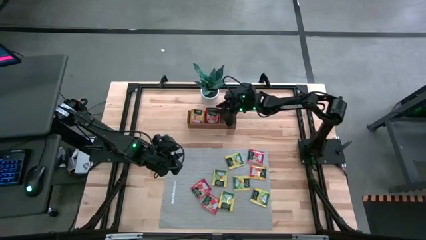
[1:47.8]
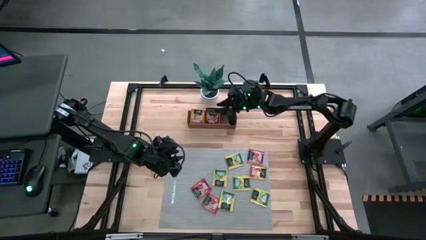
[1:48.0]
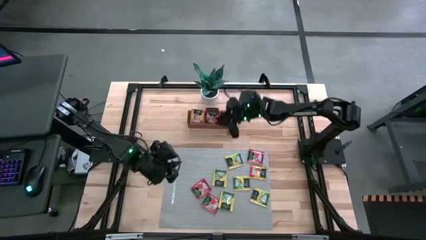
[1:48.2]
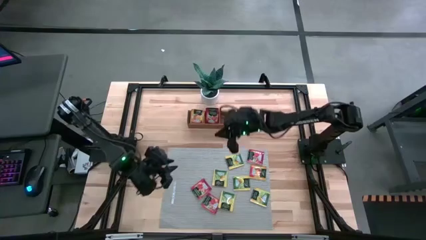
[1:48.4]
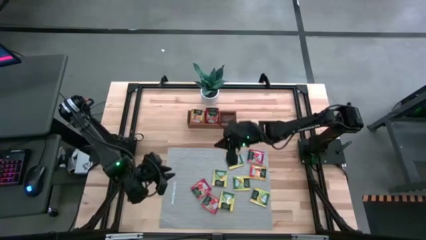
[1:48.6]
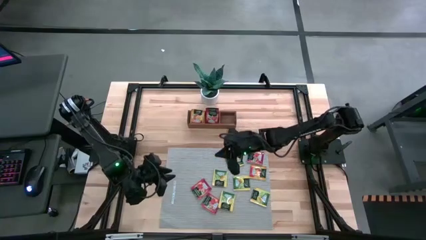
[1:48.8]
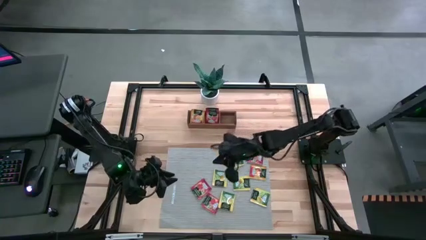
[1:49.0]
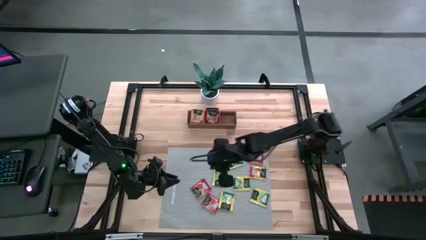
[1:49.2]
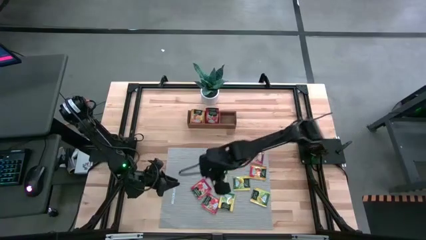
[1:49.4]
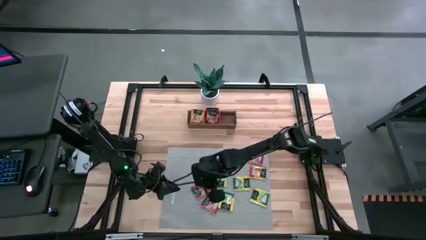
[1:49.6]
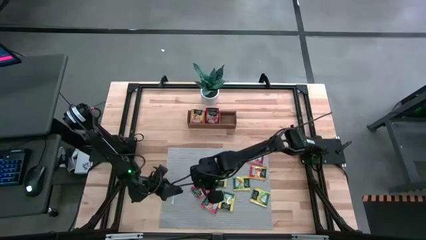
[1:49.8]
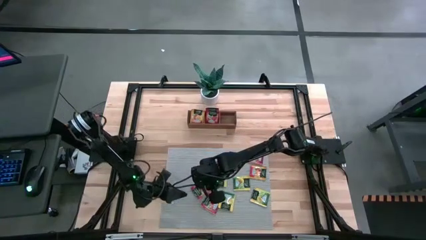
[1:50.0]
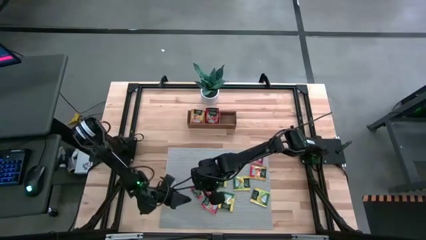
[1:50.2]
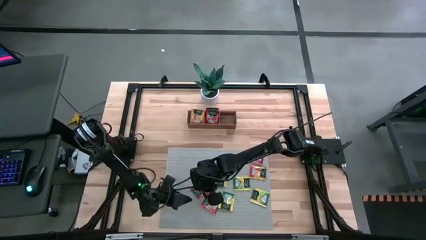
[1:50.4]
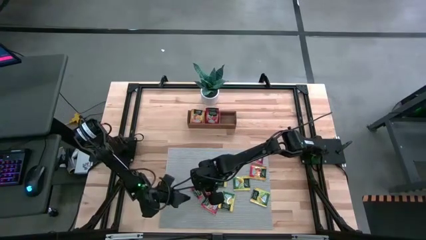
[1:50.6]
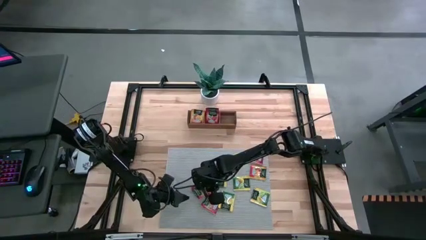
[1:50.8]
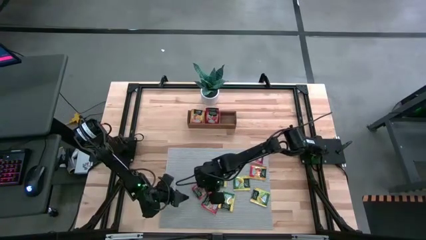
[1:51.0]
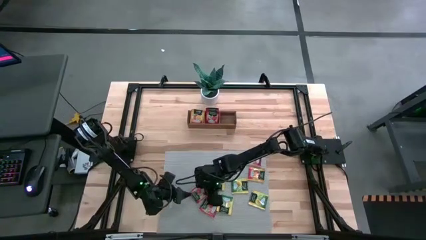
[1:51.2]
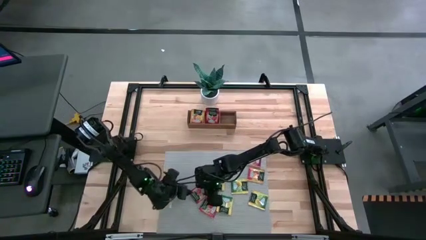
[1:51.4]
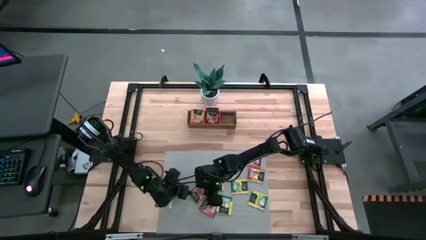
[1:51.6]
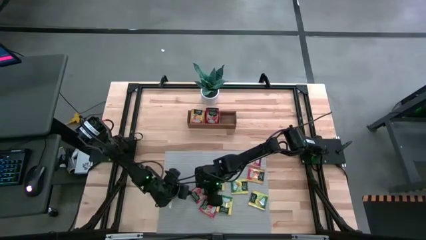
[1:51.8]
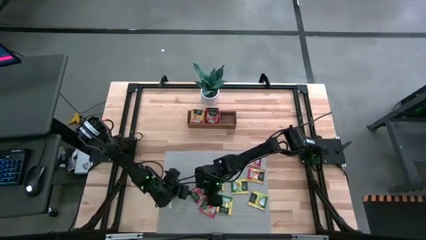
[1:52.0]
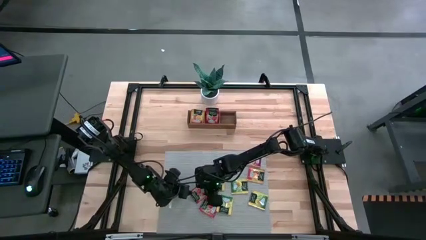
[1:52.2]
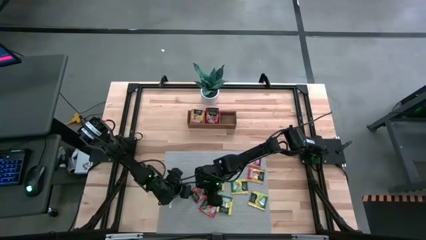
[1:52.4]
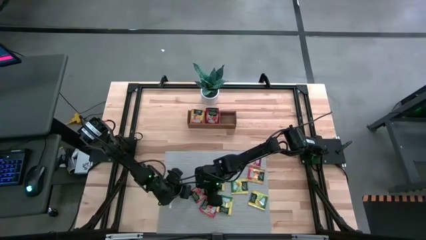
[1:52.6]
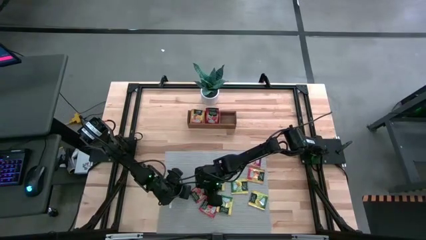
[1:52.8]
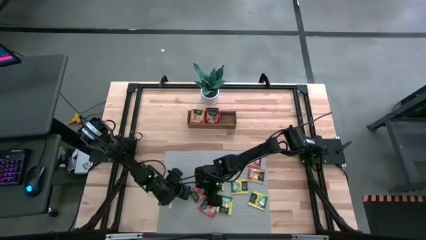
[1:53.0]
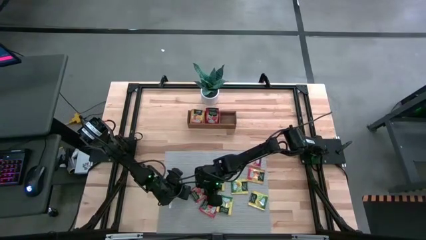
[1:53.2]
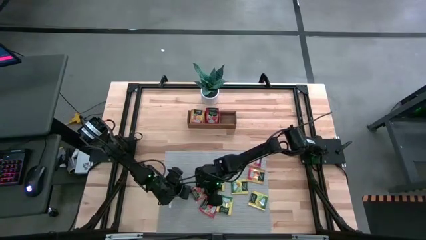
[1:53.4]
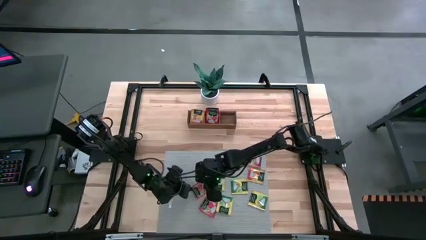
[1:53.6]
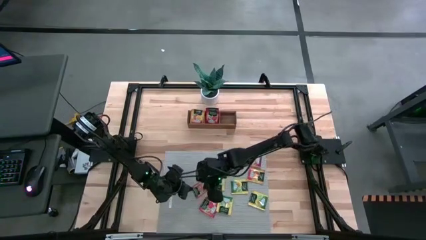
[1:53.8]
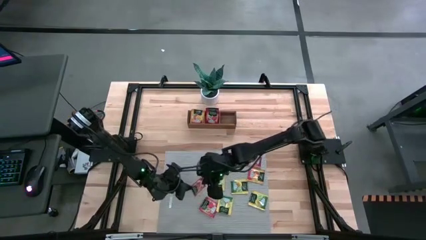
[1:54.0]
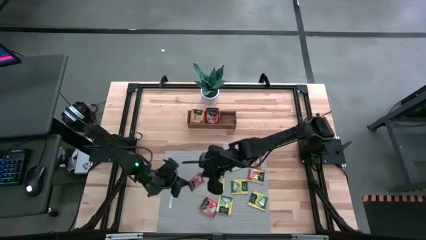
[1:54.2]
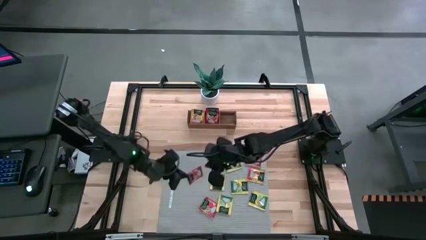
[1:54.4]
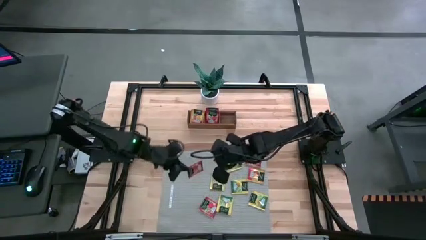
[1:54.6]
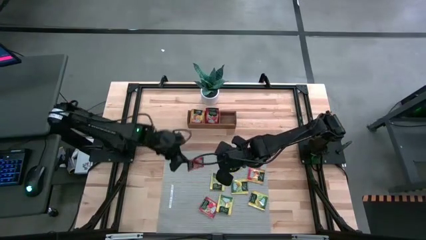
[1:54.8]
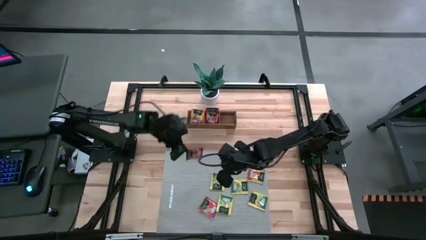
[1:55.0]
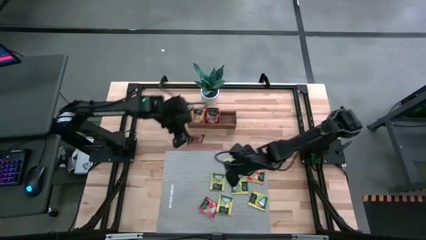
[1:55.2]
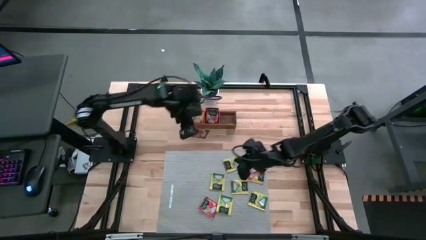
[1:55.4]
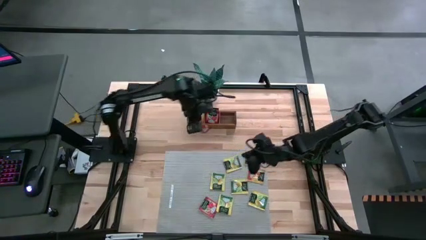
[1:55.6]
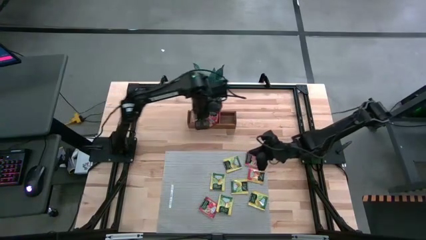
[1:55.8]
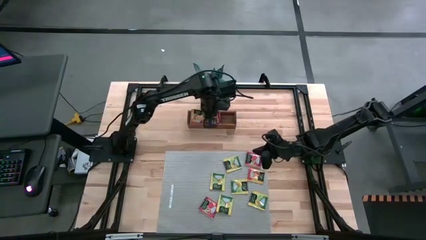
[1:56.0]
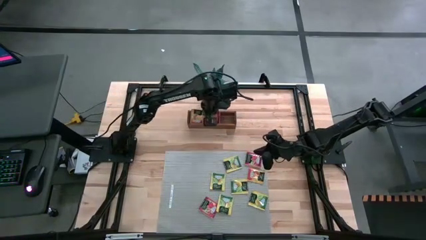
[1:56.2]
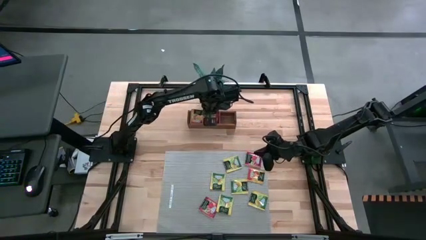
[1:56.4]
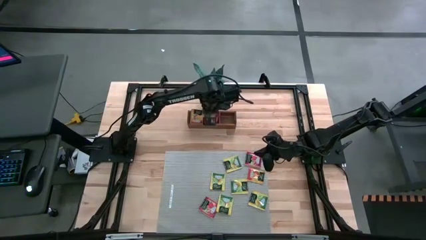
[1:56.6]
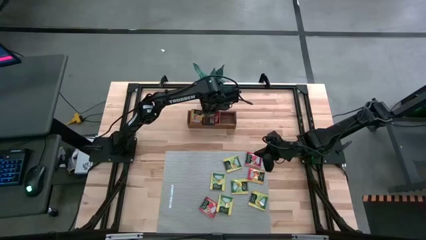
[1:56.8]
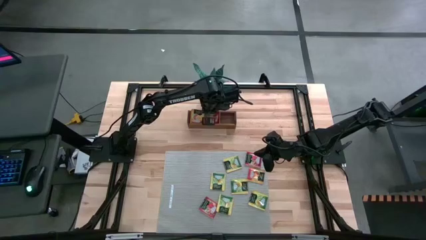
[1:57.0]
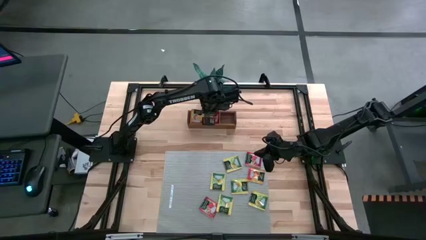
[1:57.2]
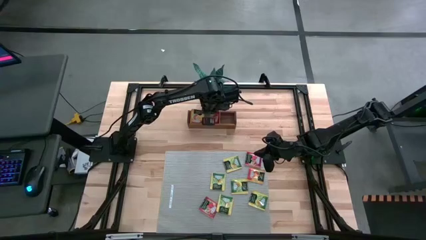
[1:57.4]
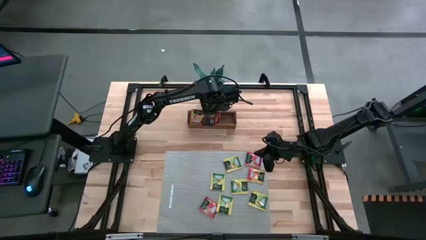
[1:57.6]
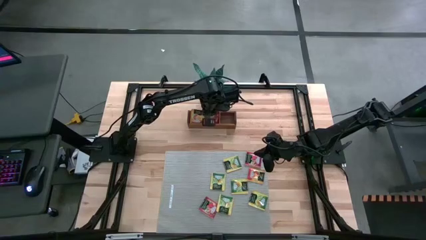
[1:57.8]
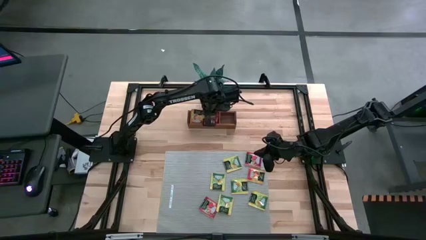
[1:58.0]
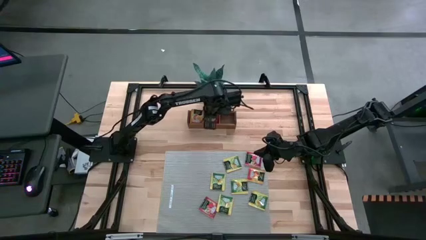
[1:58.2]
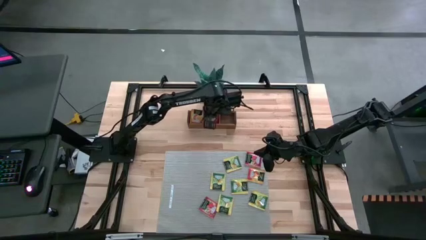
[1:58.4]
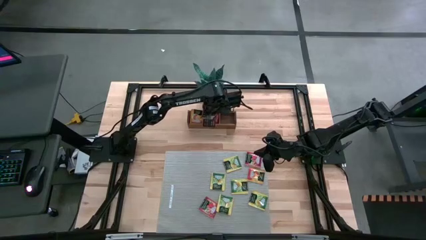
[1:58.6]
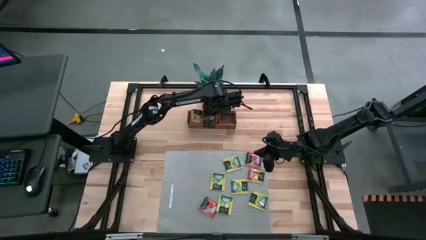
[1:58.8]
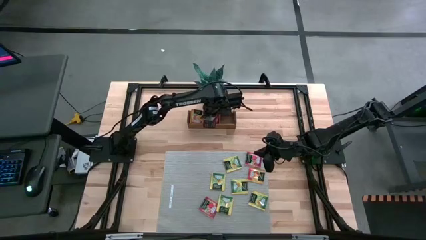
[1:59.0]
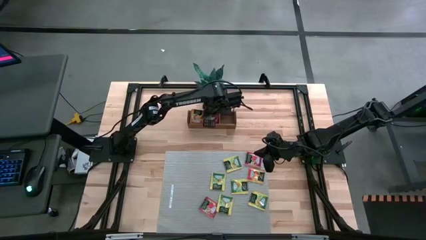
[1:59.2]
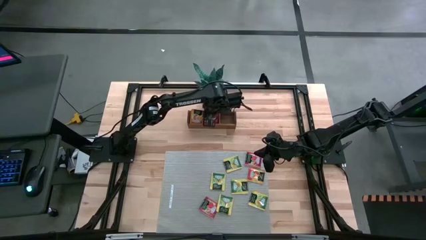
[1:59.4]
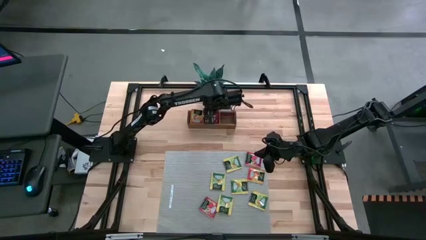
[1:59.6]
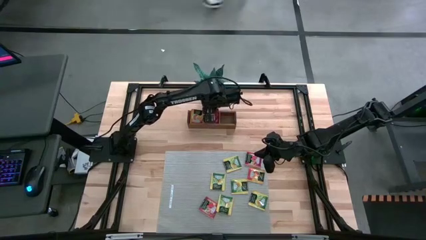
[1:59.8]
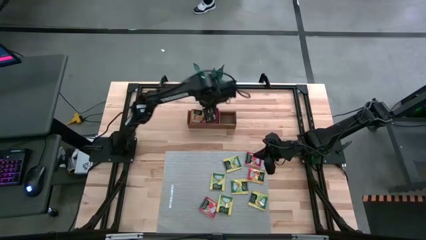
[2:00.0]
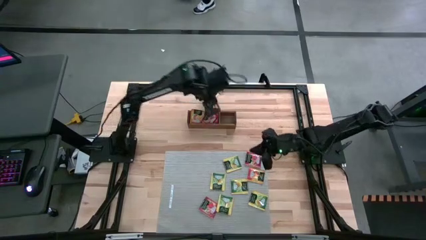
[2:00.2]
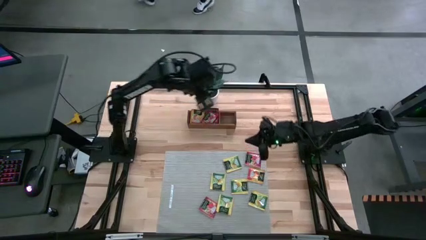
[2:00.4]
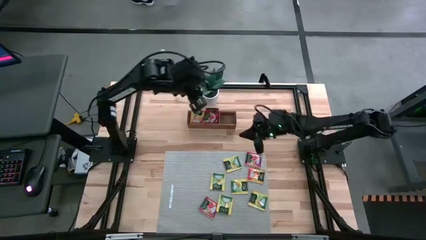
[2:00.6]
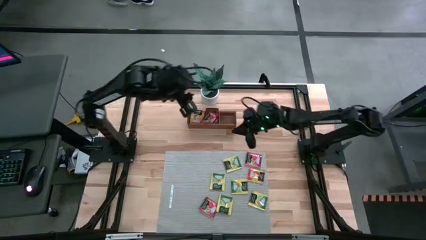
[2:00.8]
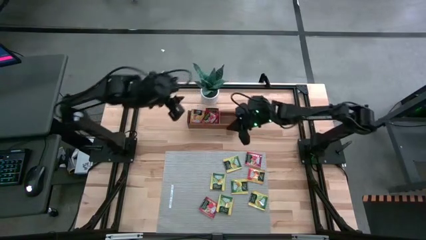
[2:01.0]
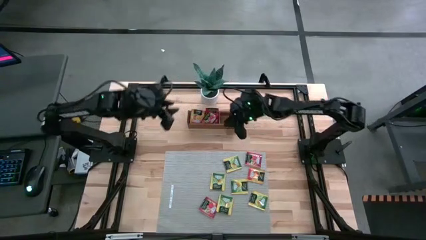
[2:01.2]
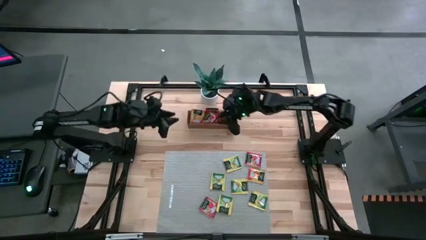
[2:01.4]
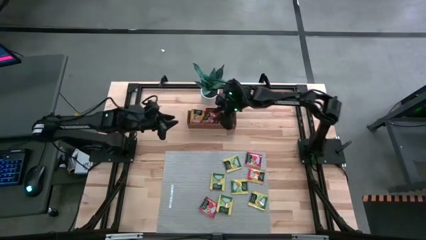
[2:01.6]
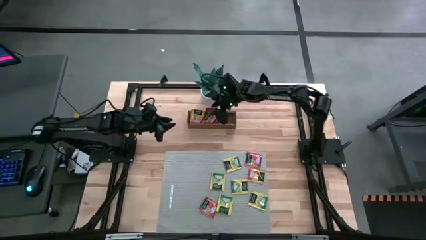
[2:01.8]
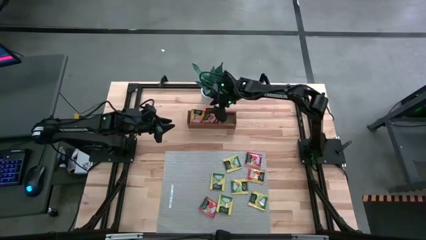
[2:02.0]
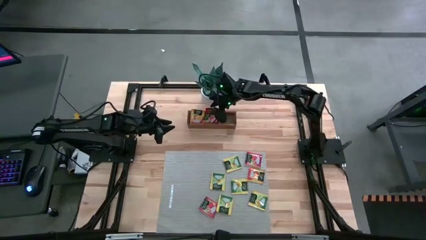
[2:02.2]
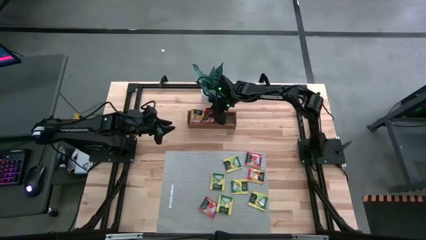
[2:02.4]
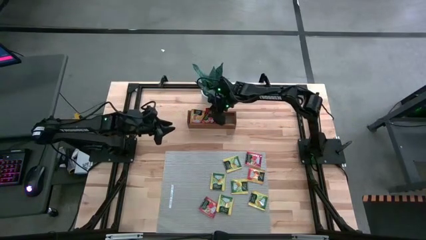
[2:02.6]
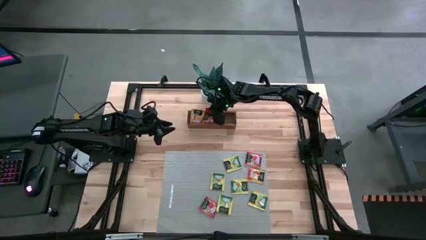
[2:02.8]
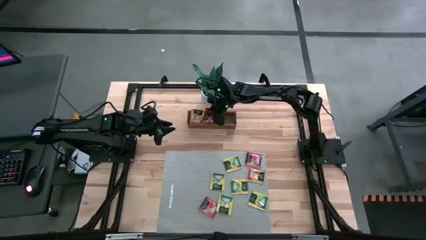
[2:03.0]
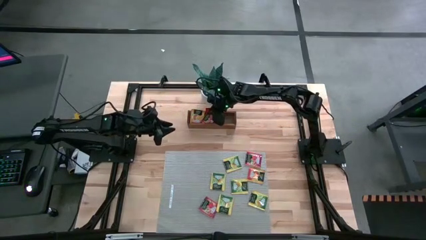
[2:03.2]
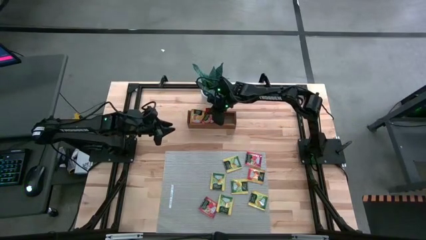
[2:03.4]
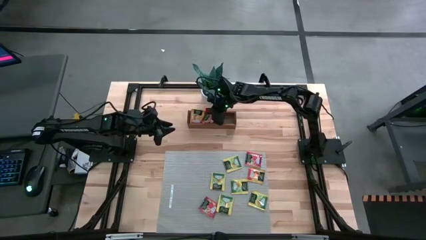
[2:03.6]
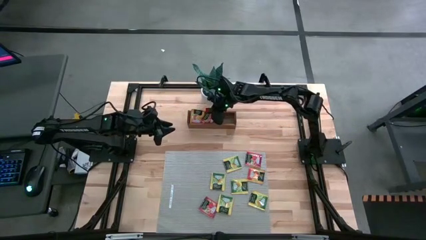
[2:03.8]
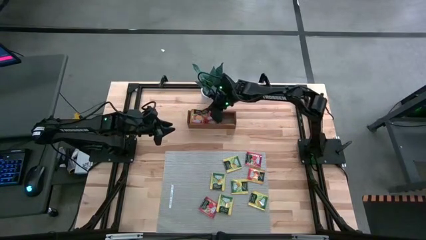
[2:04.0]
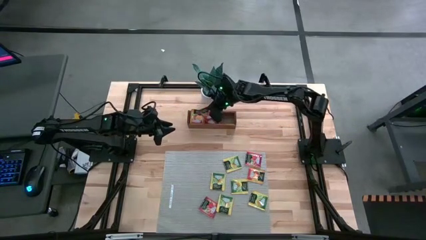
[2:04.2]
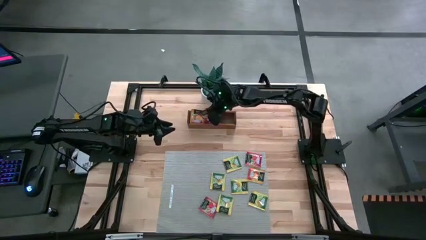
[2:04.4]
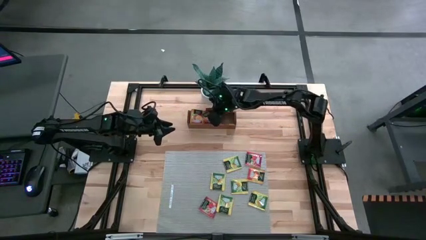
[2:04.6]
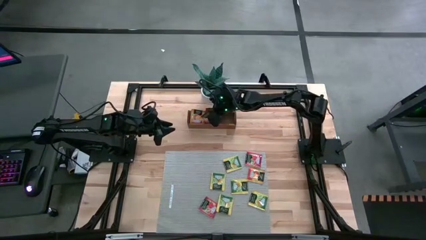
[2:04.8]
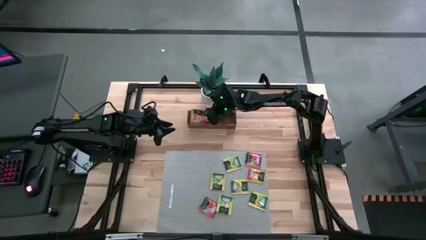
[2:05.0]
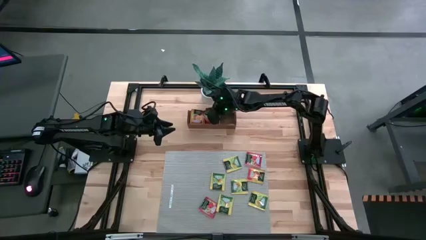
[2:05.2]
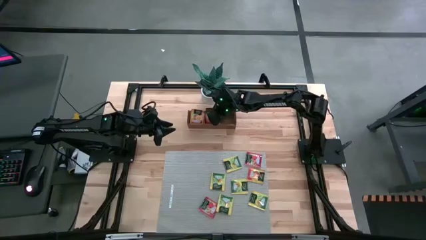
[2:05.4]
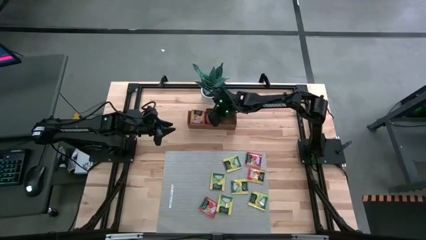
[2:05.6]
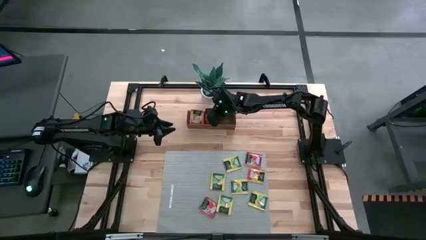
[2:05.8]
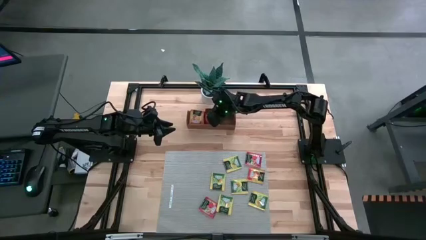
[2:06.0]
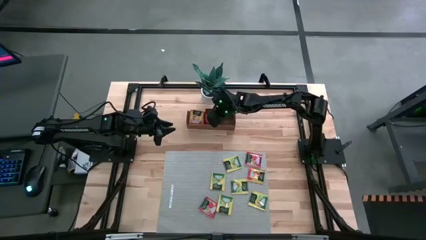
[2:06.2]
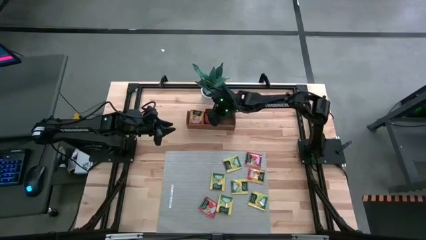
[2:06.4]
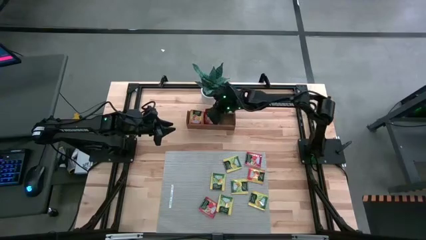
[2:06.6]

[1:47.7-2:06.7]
Task: Pick & Place Tea
Put the red tea bag into the middle section of the wooden organizer
